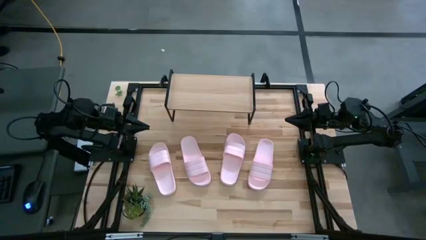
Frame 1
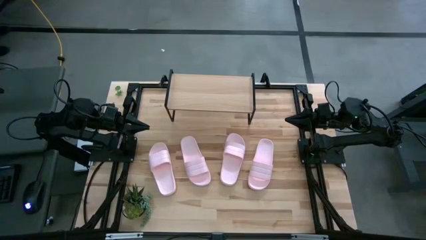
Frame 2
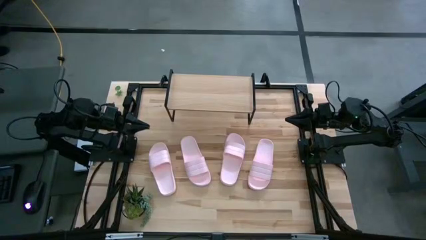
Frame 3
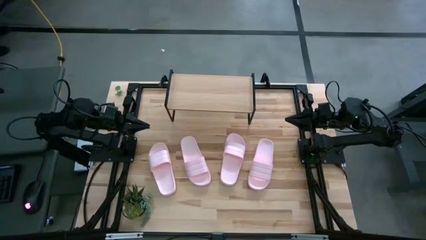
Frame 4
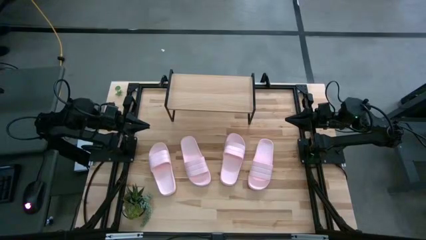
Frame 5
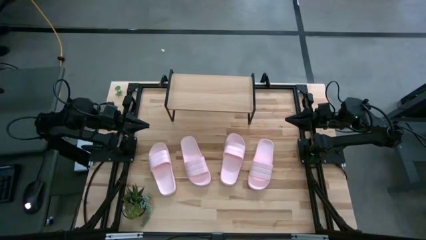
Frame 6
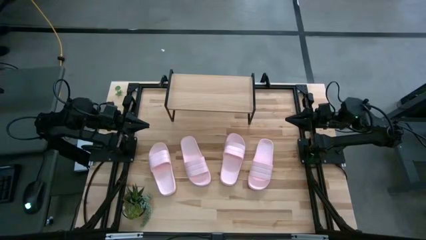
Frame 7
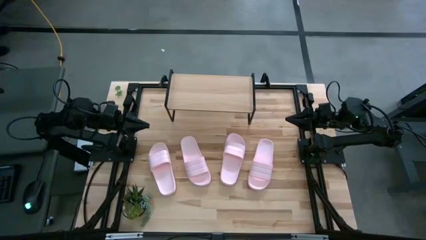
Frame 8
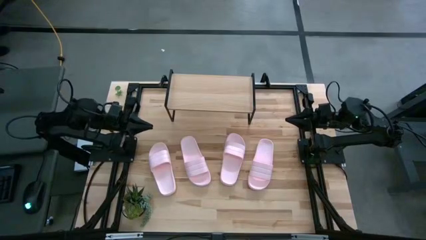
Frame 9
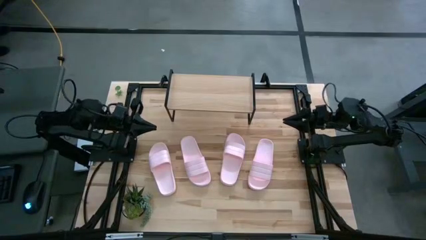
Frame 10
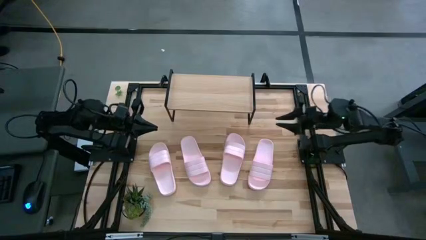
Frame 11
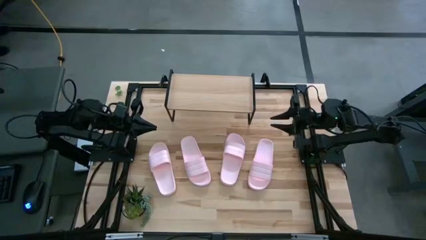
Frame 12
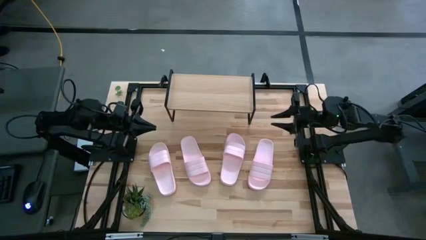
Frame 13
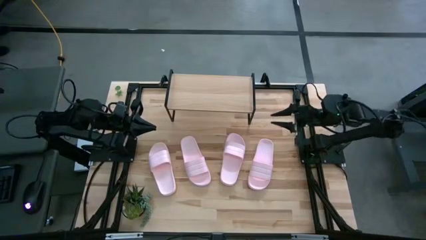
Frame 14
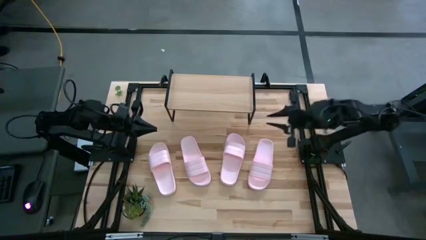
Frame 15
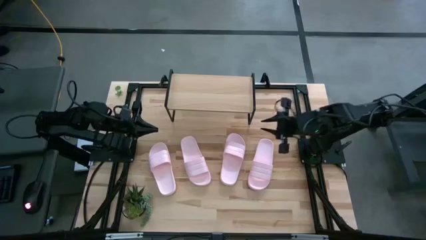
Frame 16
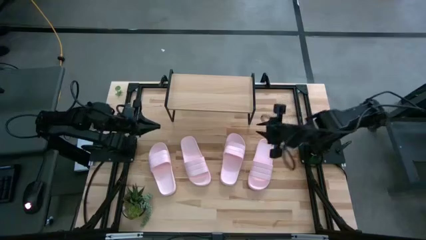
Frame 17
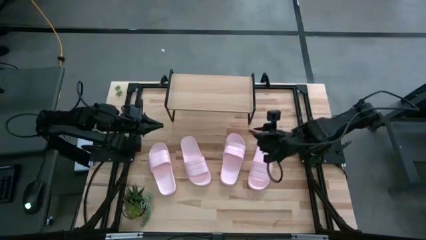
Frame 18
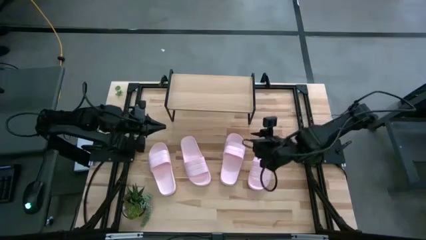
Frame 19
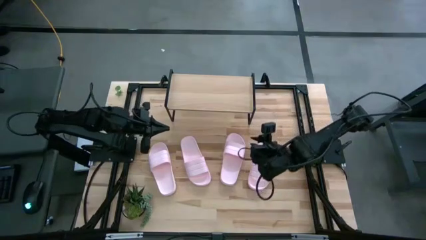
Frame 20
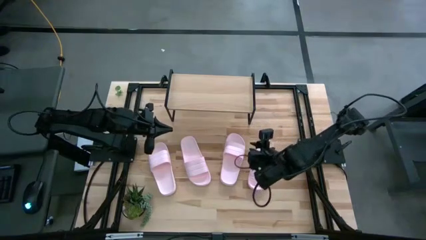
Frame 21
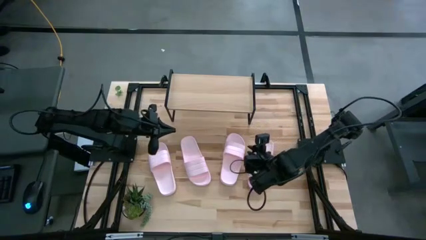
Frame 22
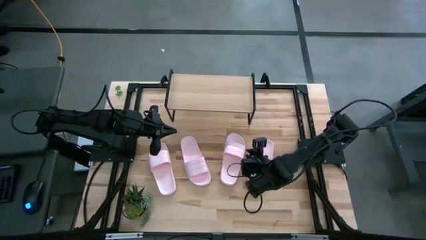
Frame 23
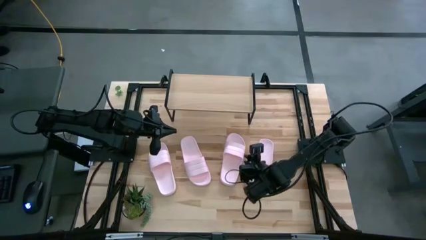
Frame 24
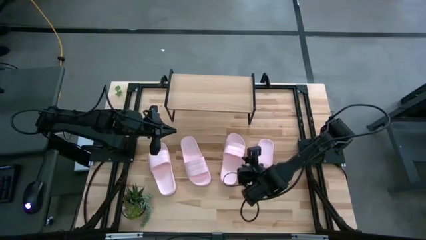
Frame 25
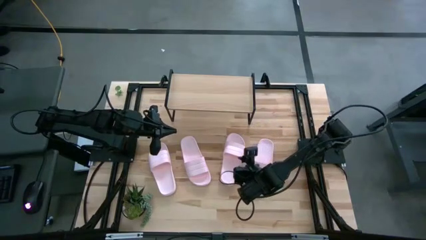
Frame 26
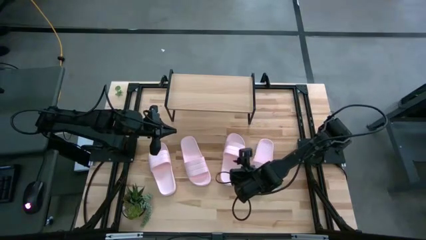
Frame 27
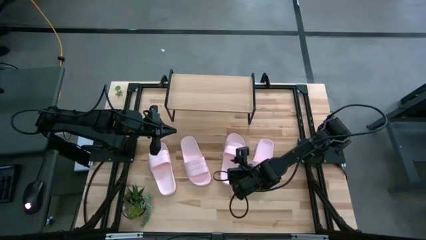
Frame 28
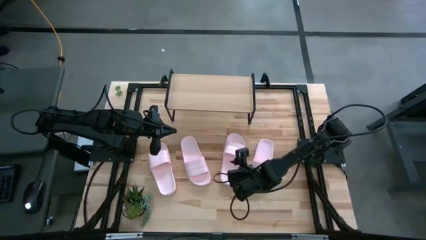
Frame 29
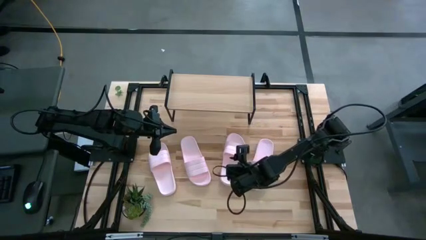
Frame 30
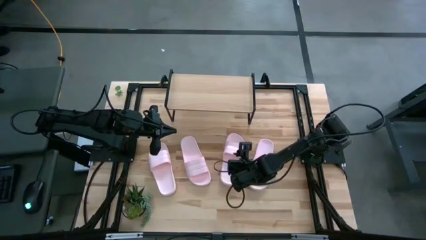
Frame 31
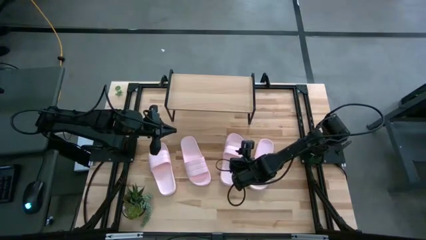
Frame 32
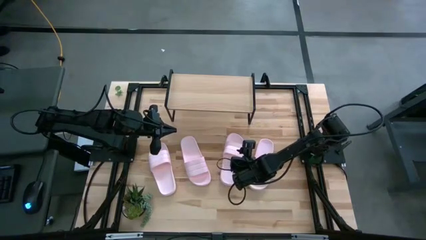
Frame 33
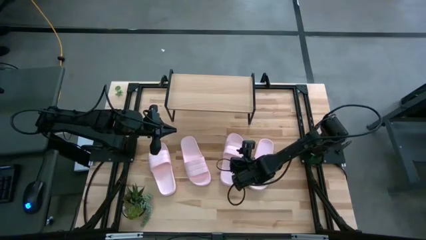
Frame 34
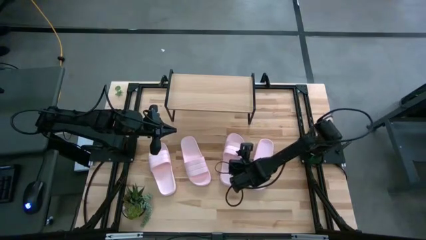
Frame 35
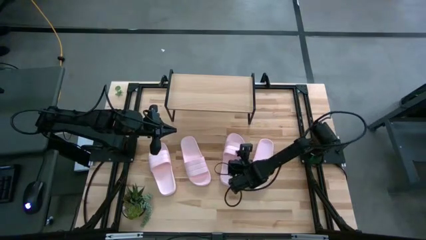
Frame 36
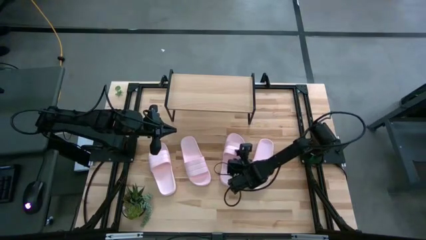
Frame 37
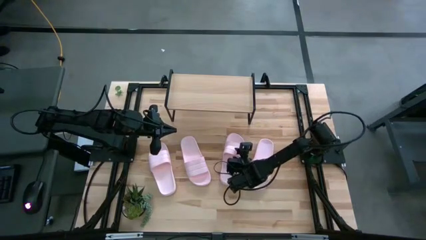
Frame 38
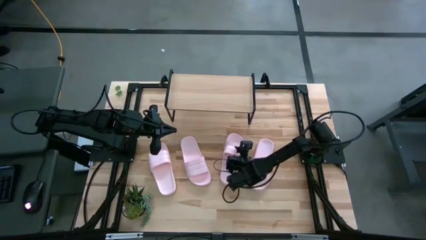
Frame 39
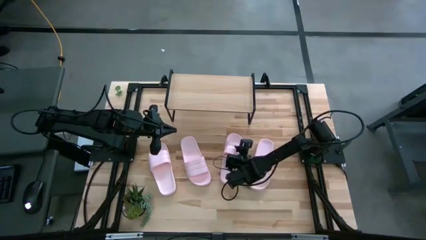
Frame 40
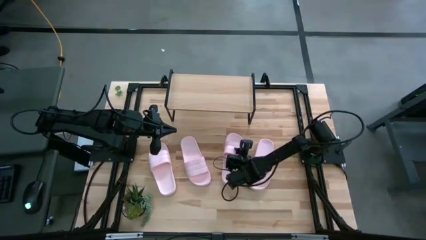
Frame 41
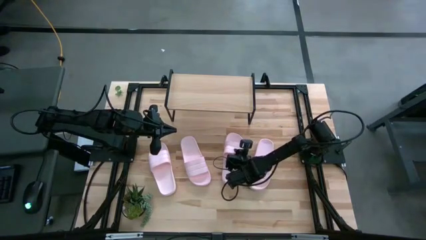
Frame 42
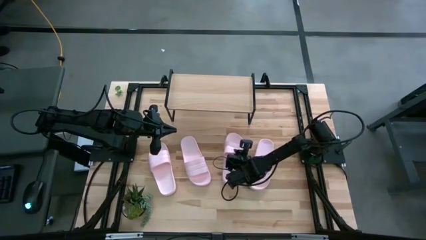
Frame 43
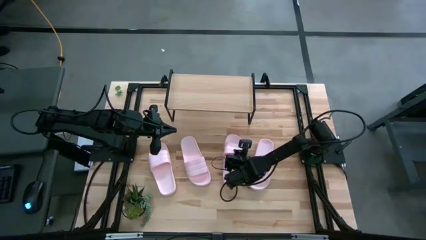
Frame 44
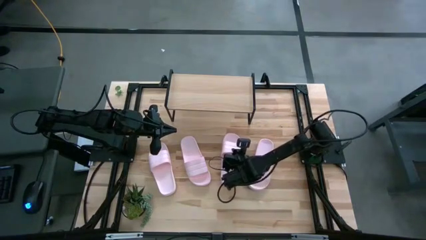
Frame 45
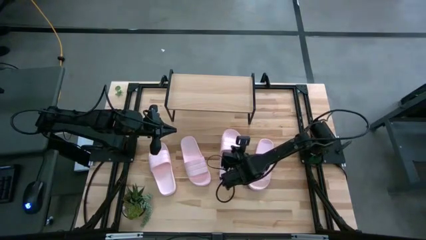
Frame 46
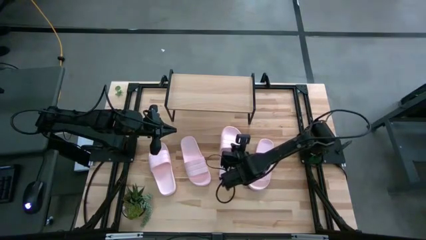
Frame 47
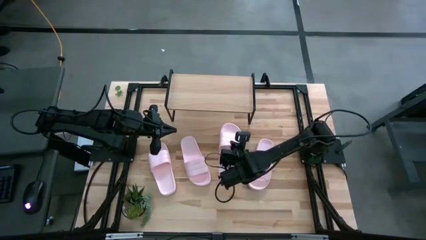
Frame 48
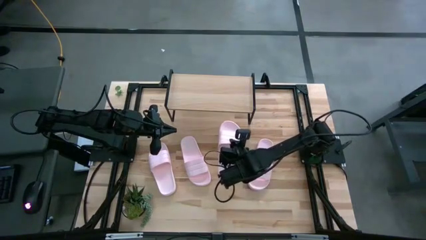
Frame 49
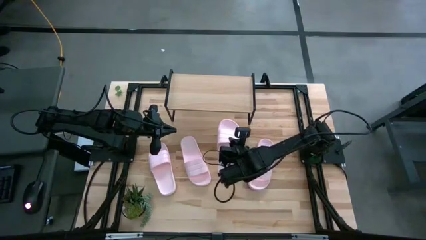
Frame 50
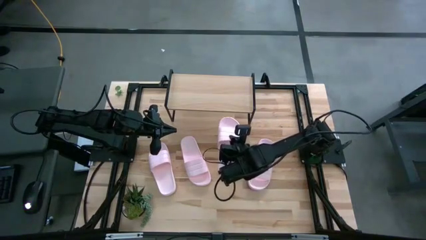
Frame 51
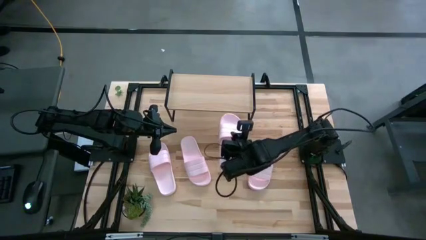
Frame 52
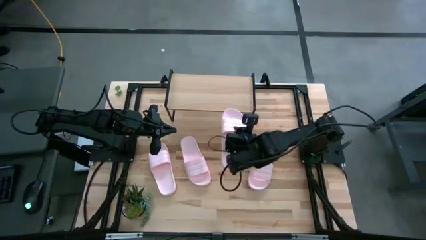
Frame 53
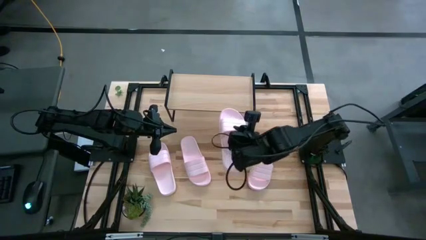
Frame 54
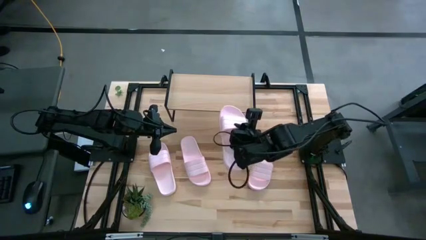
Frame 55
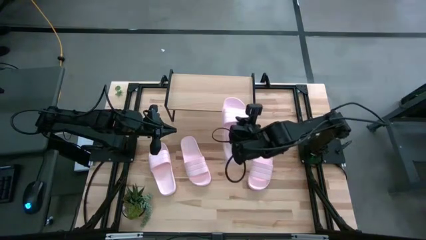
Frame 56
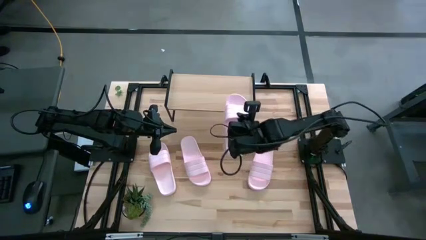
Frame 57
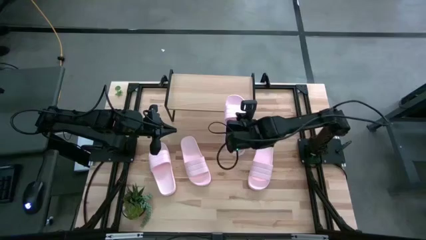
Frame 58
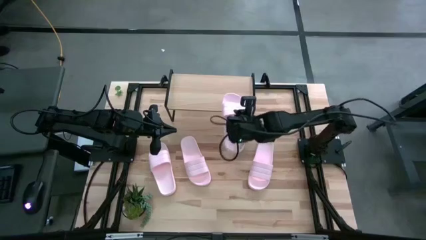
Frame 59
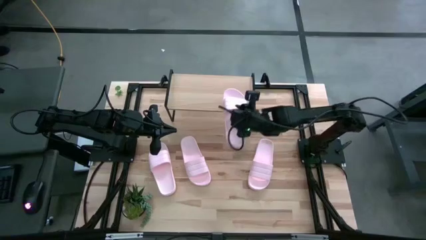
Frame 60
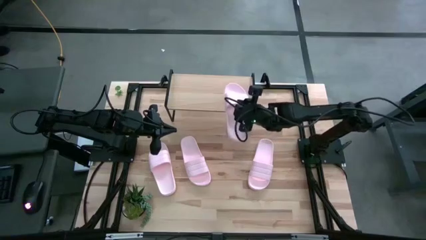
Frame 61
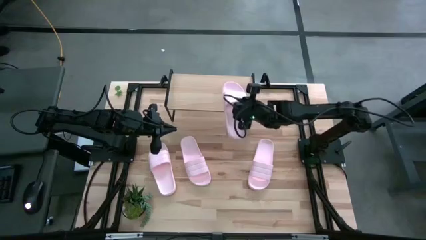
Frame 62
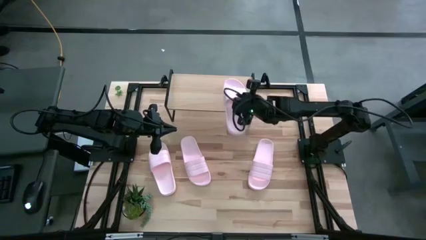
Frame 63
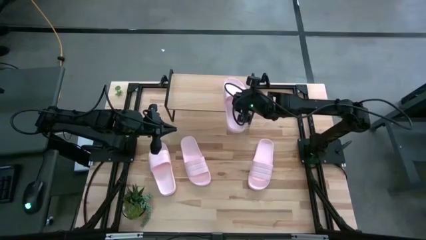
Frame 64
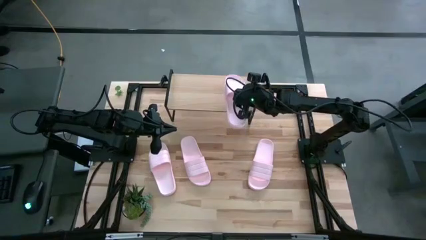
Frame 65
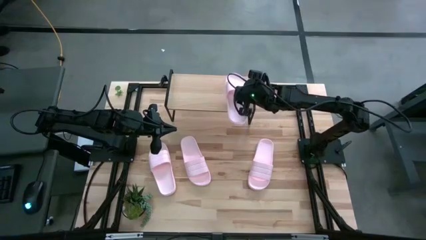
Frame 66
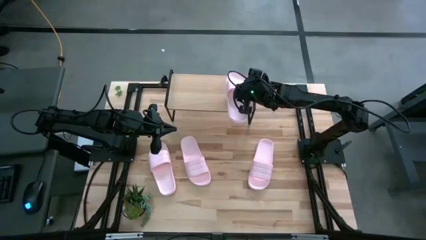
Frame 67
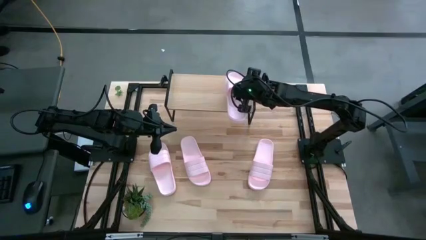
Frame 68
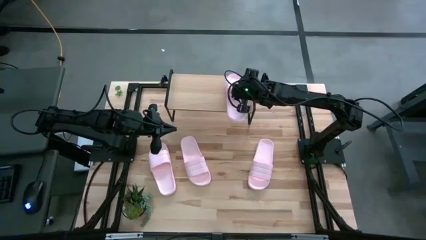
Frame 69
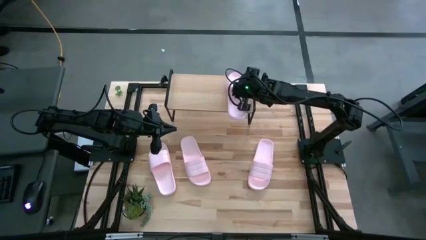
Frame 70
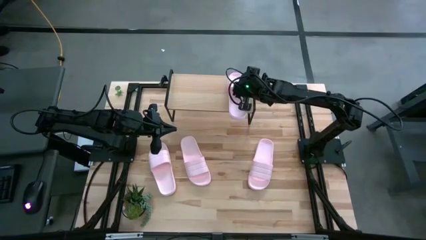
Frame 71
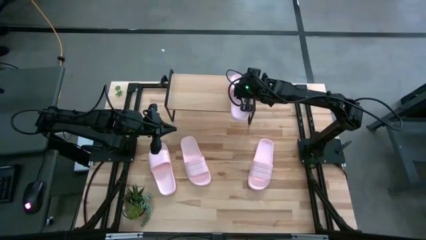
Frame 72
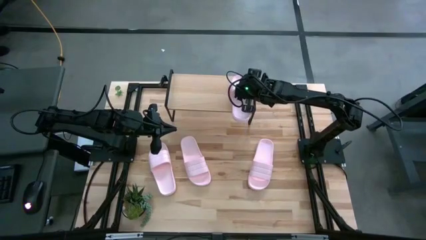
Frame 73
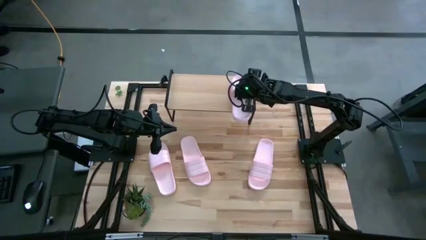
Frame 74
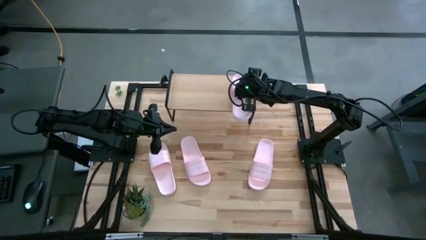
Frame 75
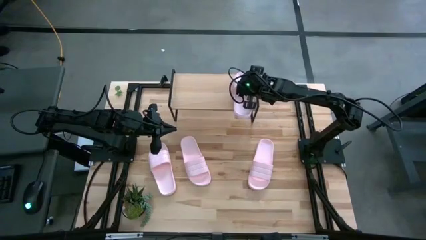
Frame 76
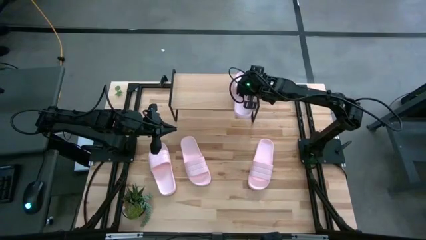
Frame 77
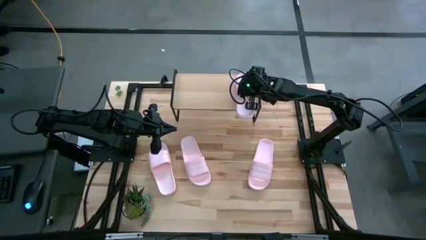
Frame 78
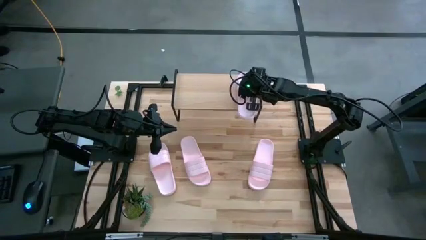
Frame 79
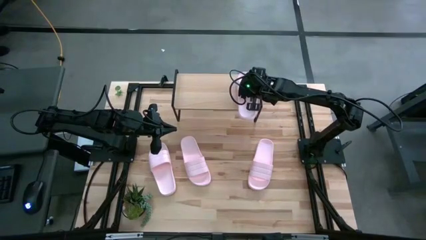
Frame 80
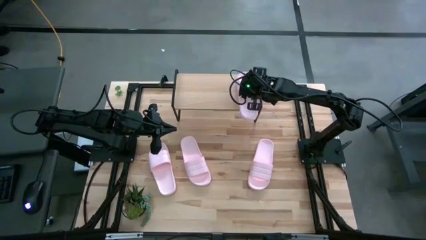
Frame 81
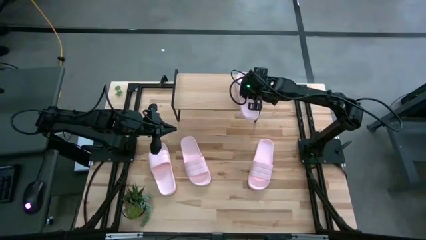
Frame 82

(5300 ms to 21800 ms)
Task: Pick and place slides into the shelf
Put the white slide on the shelf
